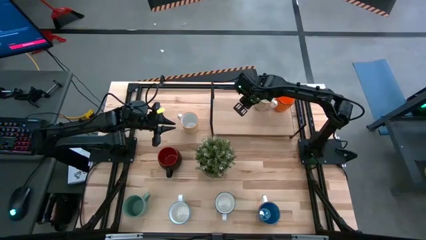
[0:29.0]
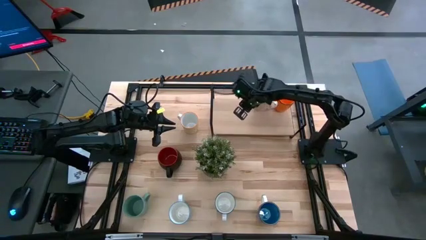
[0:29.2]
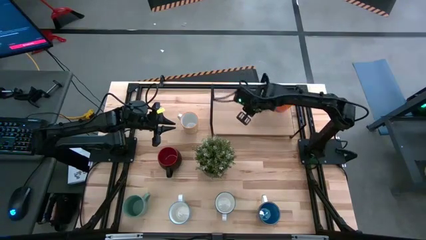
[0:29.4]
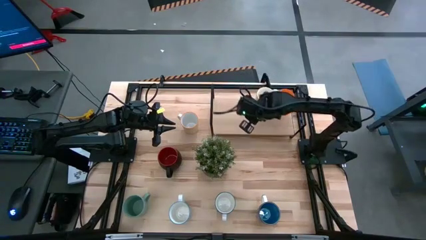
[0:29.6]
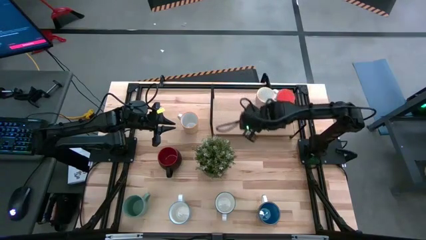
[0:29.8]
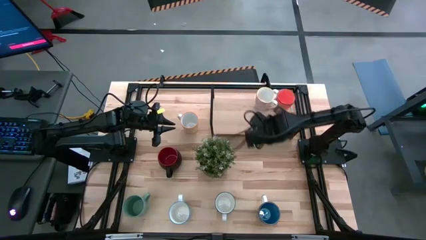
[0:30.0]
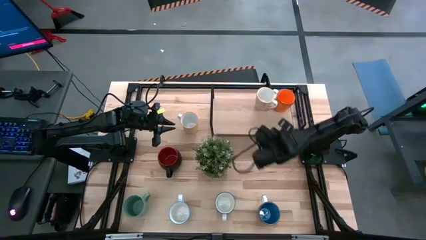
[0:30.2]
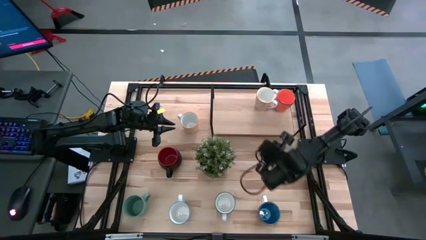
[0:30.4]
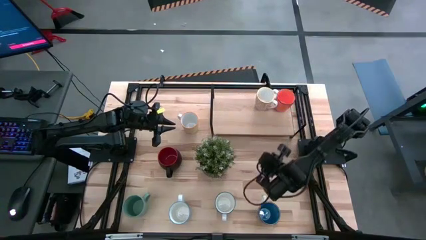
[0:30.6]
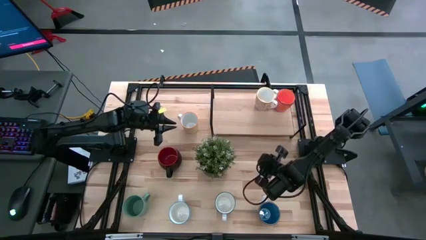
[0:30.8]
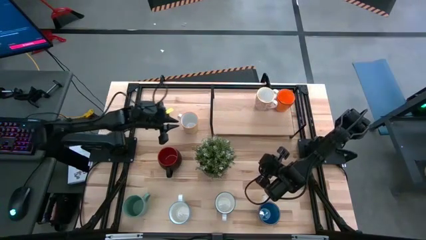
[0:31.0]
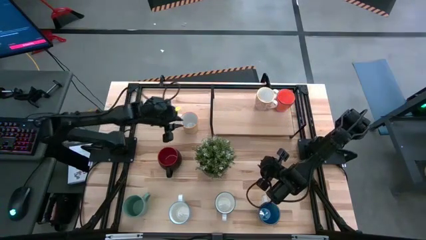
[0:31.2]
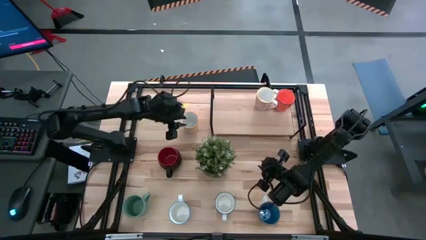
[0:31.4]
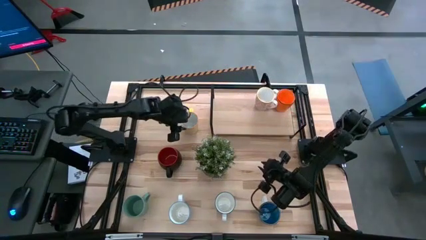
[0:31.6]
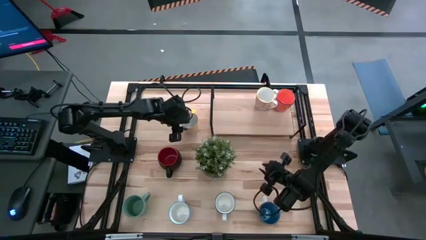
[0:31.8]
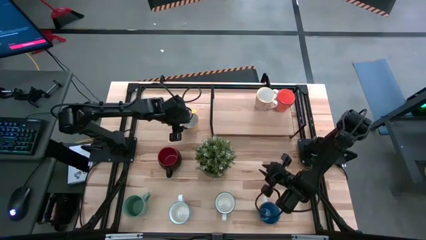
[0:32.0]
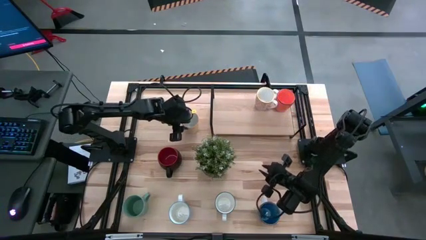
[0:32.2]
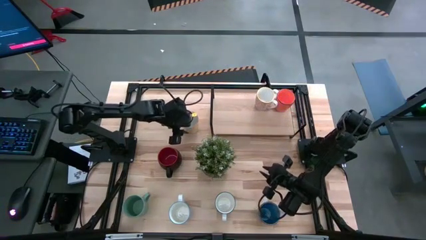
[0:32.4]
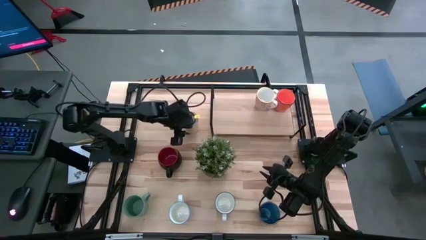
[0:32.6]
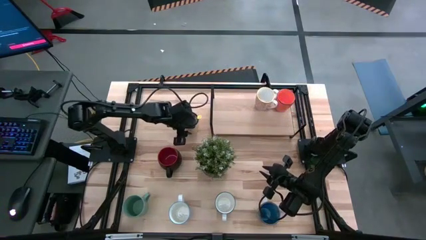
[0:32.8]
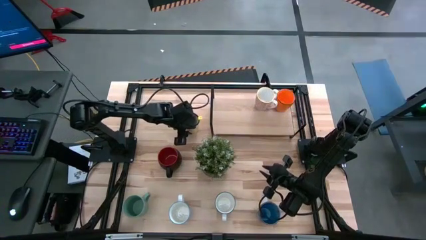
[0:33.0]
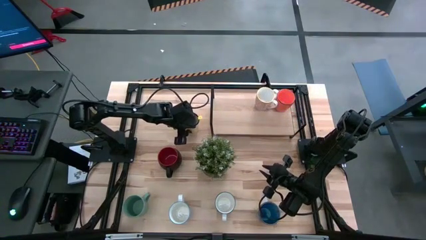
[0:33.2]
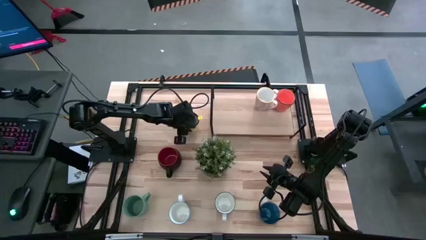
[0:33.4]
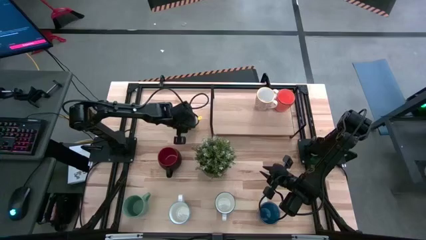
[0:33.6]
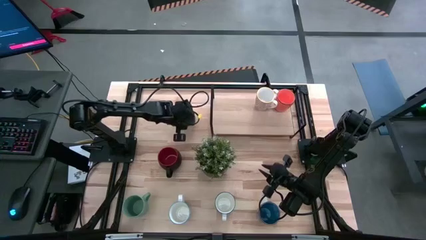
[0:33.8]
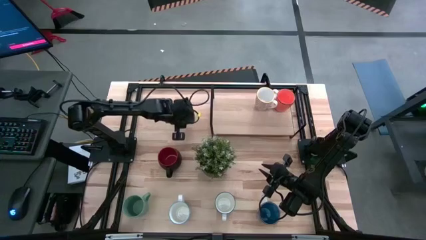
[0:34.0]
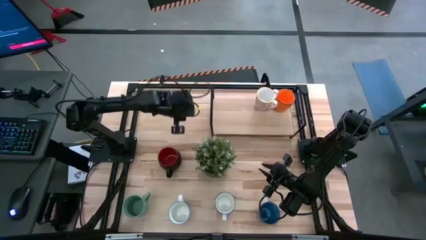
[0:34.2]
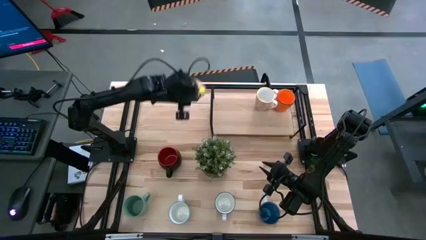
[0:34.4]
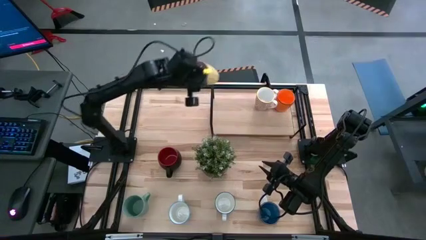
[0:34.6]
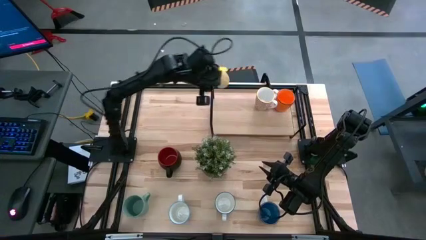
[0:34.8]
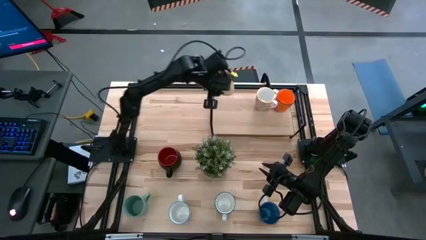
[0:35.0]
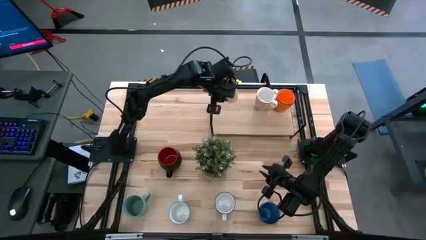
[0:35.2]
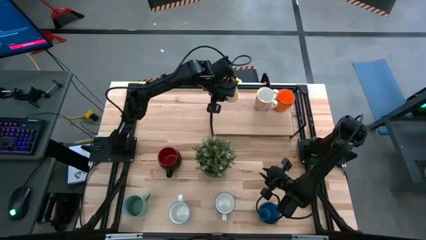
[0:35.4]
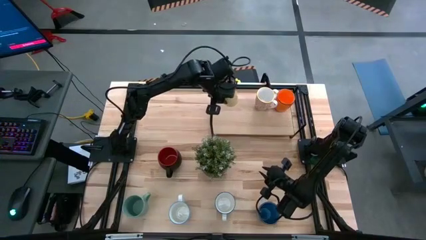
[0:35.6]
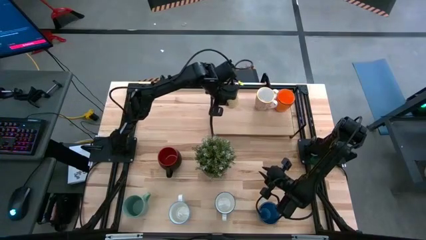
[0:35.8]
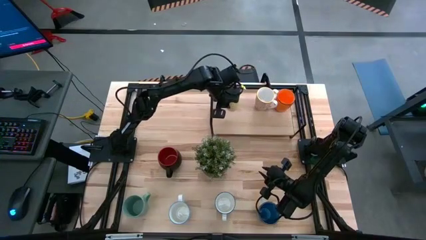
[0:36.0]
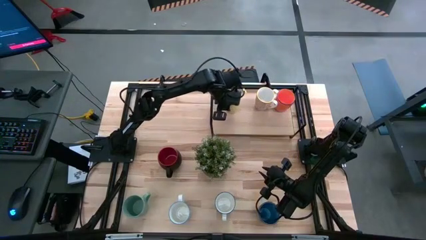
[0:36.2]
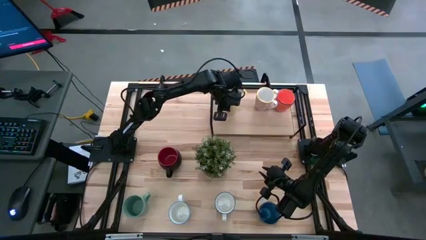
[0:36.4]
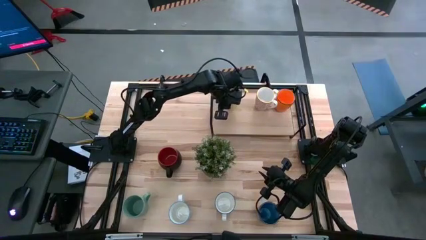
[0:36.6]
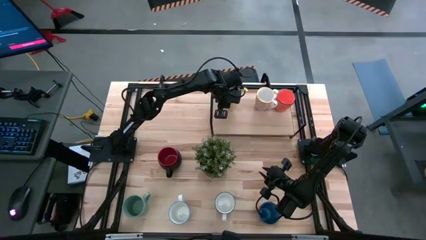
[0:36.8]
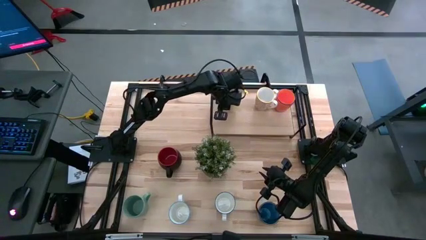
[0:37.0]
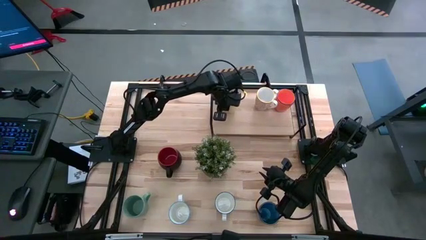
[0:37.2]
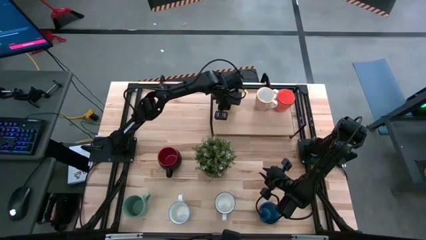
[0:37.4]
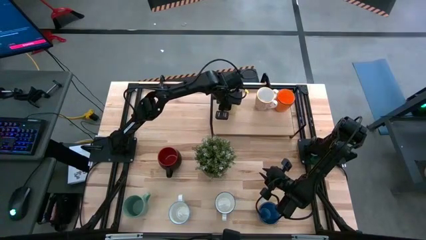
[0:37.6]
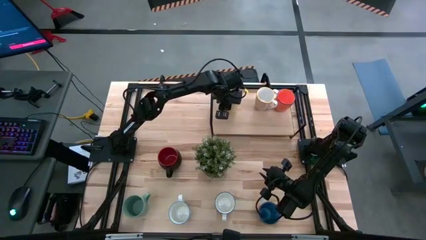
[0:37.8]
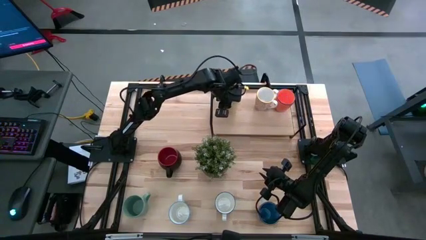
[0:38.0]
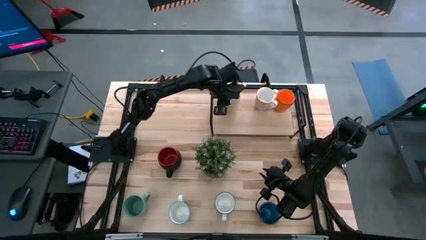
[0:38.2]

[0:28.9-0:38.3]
Task: Place coffee mugs
Put the yellow patterned mug on the shelf

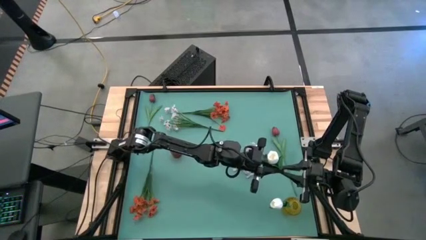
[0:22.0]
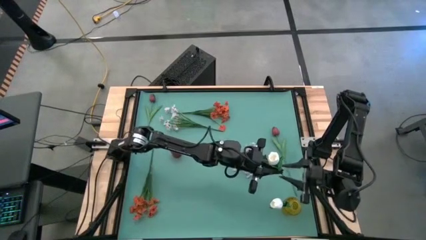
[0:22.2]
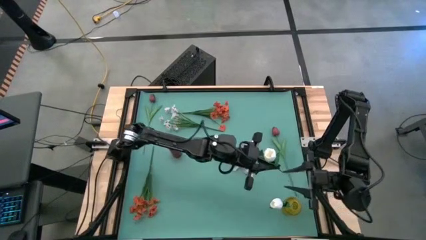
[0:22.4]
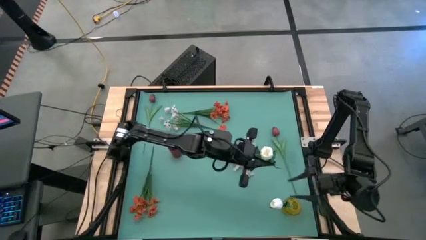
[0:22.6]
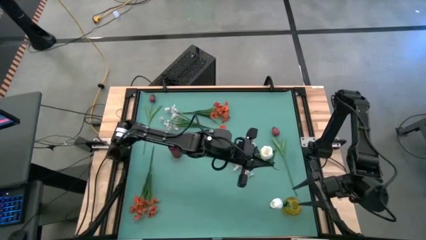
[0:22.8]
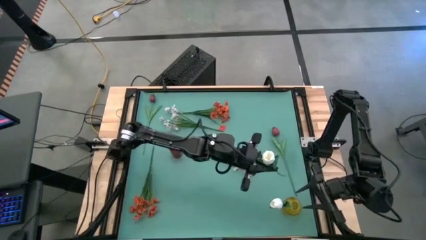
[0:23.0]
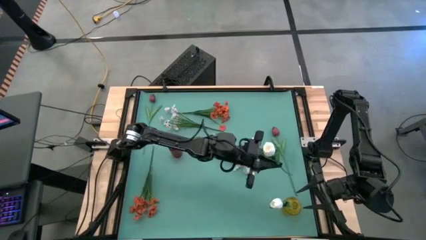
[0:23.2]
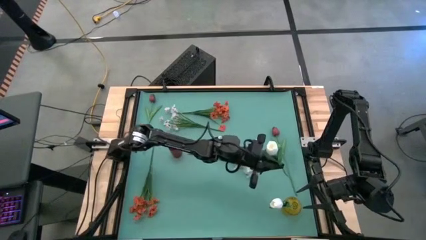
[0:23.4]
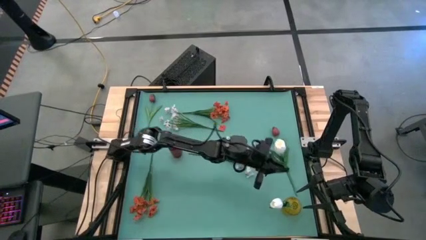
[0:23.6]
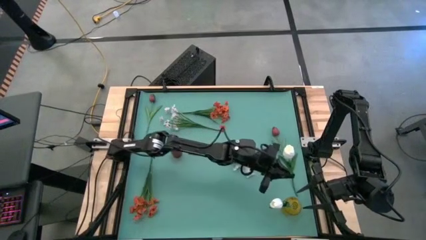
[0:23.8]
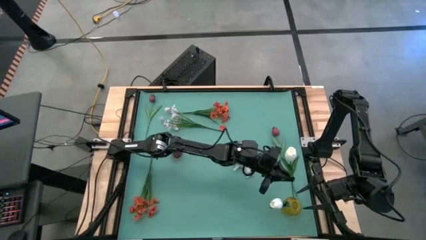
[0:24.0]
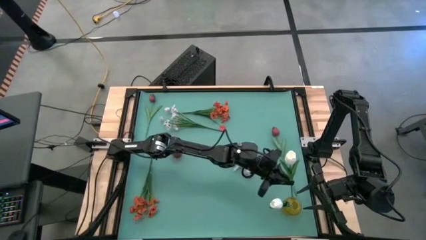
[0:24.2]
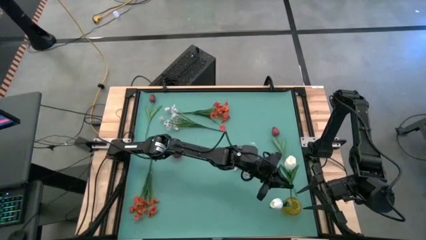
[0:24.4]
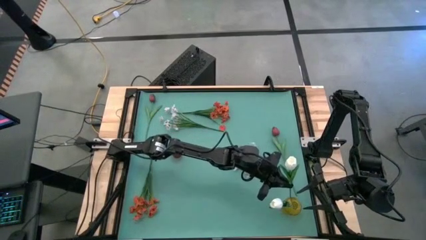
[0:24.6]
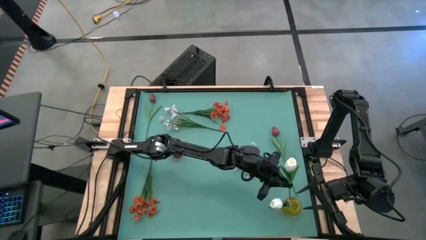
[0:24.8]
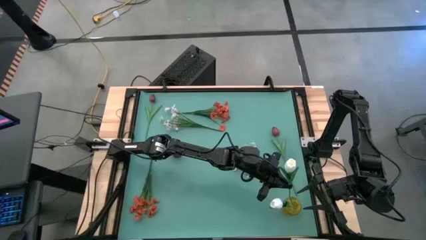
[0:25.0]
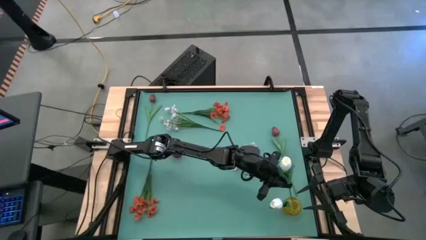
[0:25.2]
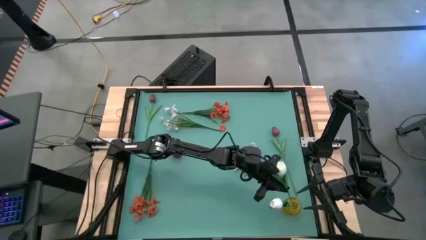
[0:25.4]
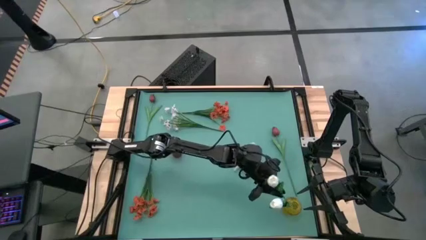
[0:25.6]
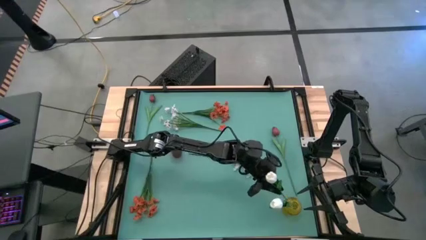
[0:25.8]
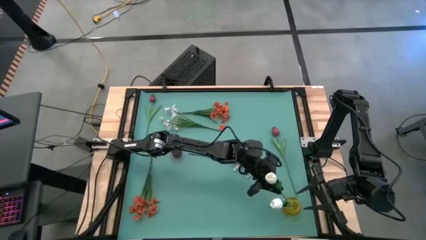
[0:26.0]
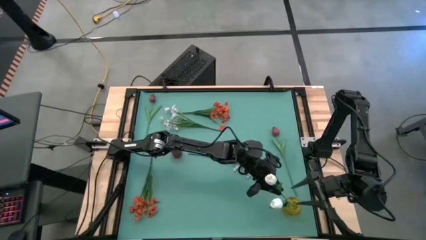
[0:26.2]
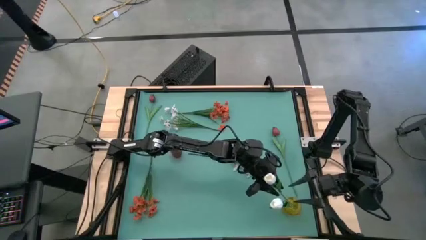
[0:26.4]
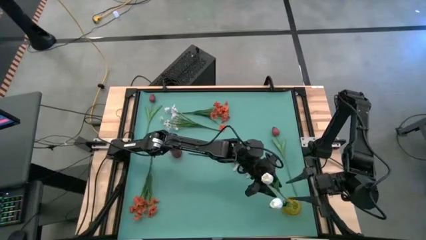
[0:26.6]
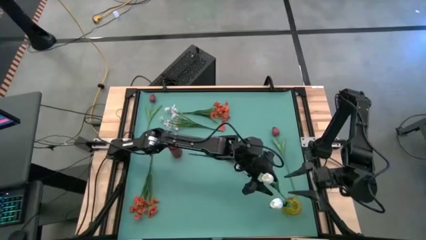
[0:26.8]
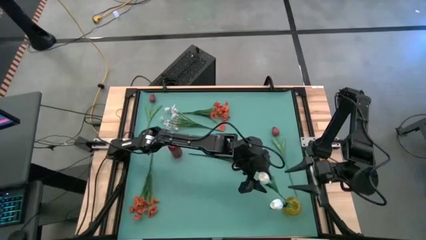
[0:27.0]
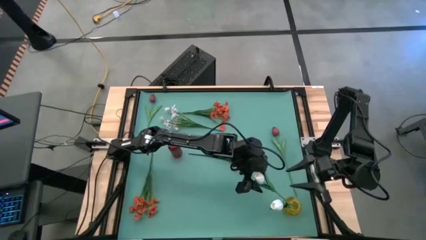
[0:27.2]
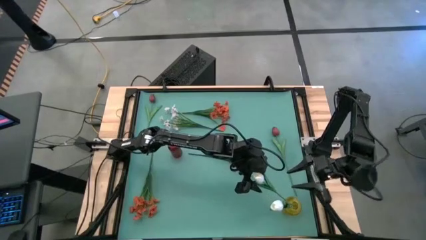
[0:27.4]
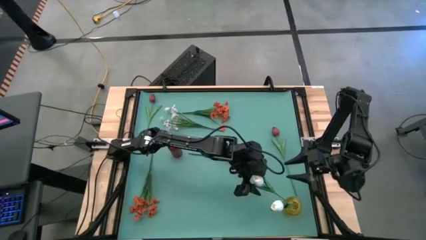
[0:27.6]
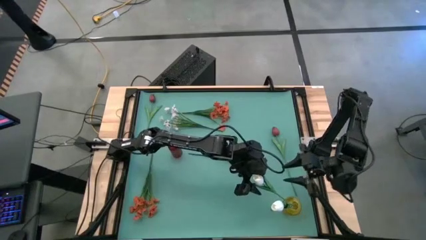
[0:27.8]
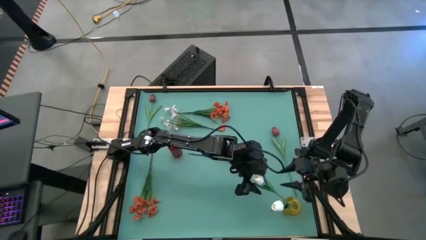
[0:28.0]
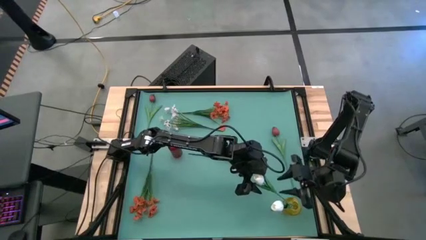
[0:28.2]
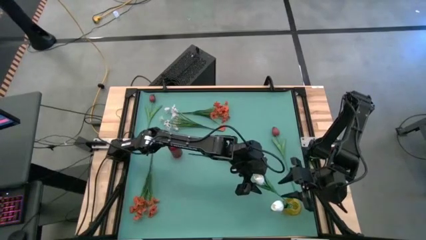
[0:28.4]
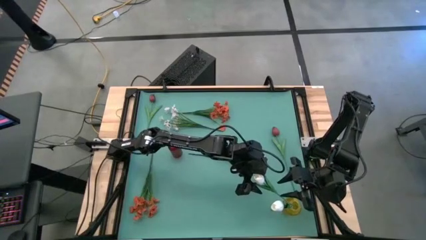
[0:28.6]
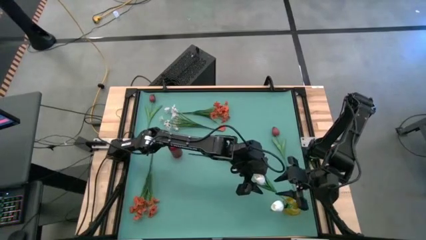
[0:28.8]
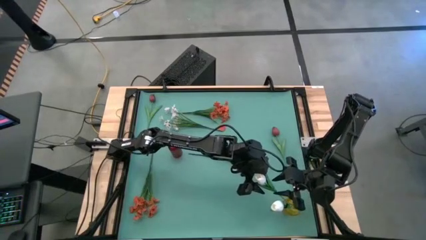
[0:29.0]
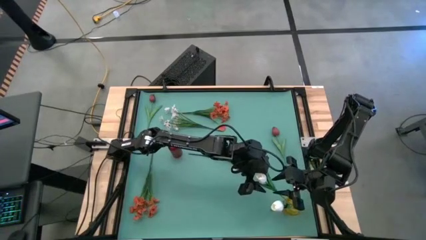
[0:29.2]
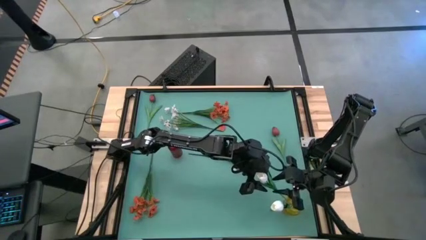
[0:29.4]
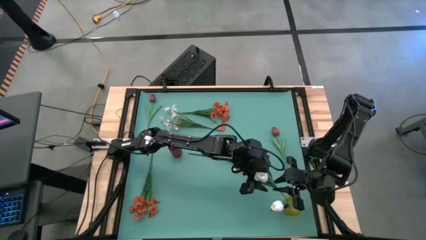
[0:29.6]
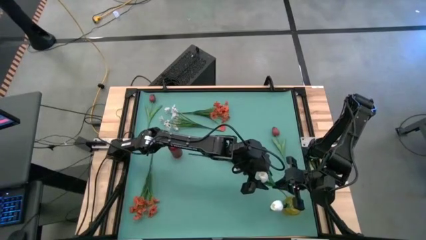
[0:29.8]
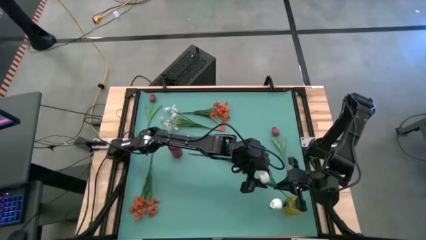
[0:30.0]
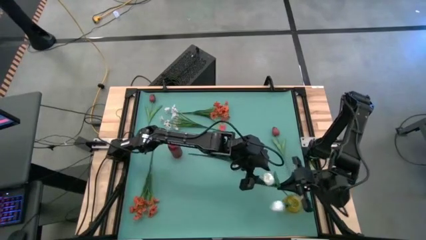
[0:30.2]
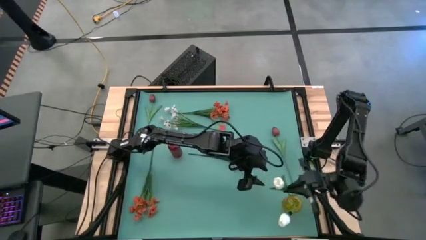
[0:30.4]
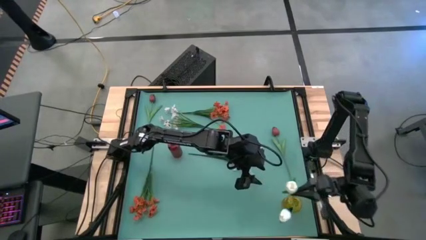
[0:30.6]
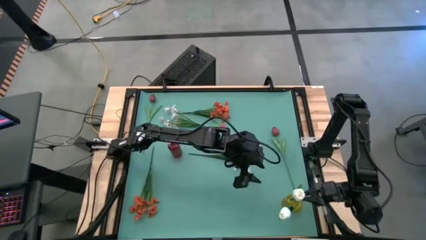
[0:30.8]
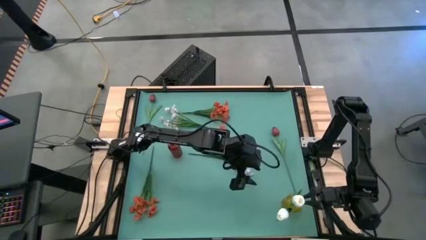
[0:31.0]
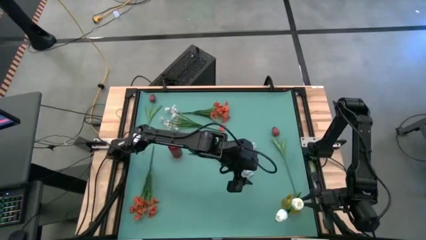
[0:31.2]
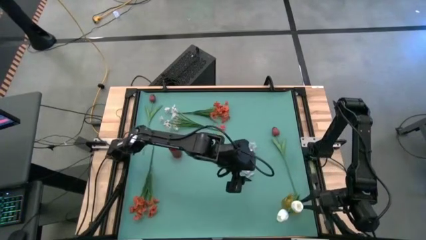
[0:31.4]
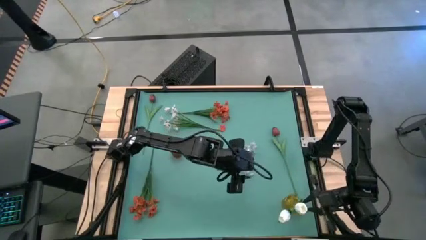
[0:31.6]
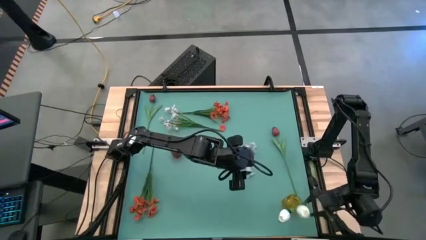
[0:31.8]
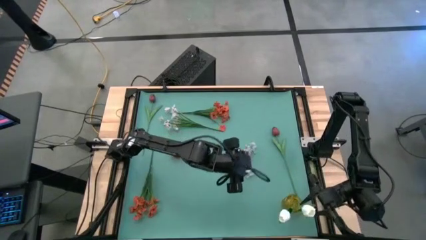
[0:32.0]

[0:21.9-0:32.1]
Task: Sort flowers into vase by color
Put the white flower into the yellow vase
